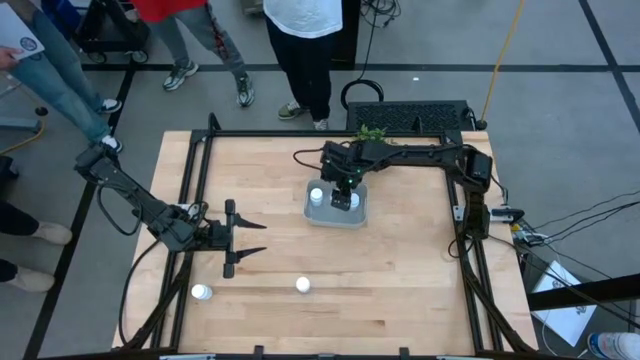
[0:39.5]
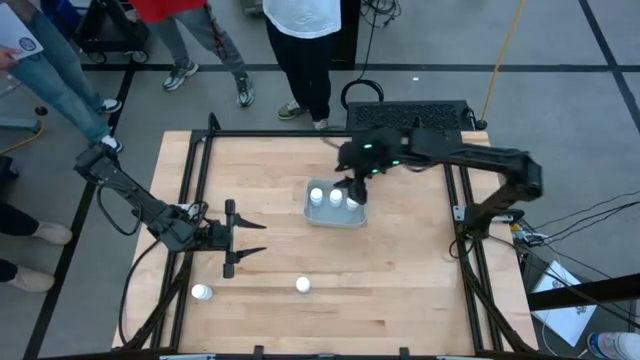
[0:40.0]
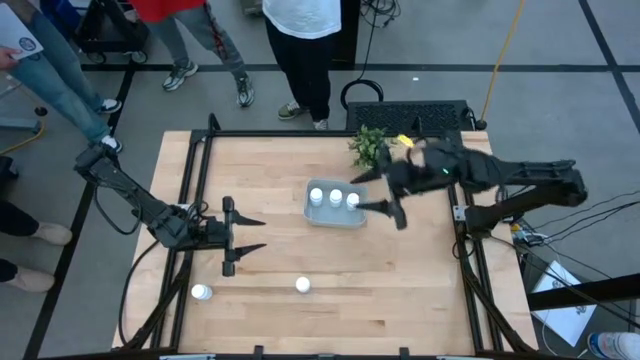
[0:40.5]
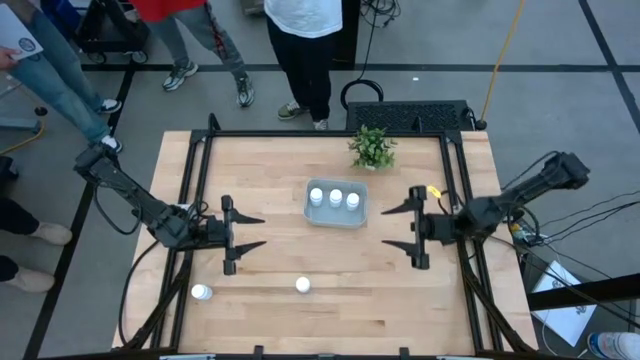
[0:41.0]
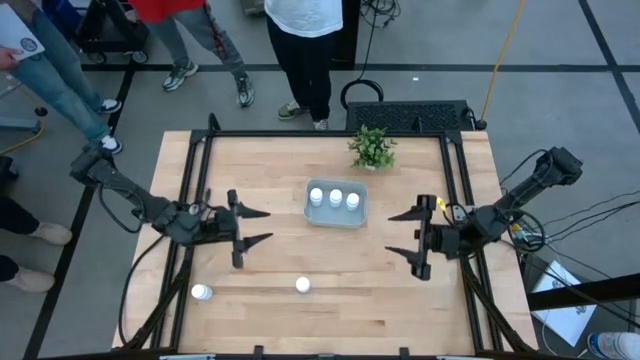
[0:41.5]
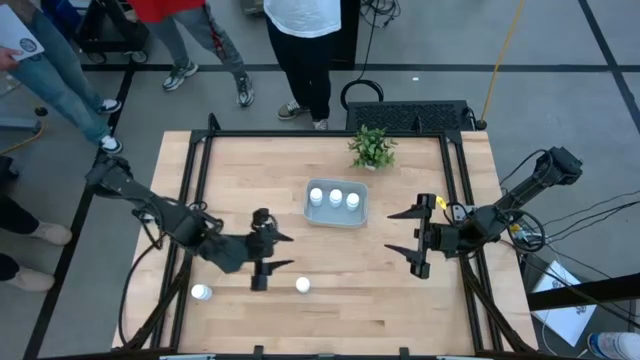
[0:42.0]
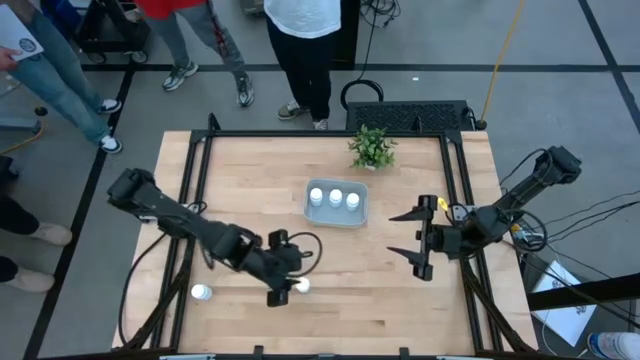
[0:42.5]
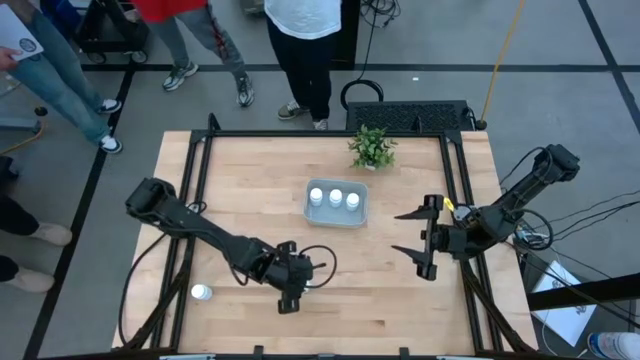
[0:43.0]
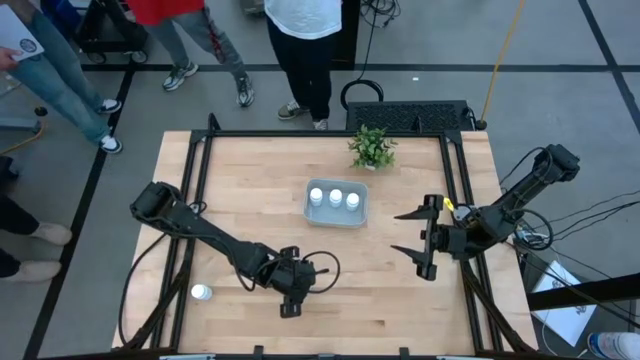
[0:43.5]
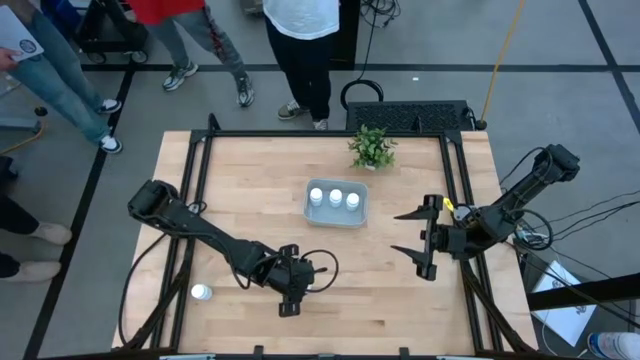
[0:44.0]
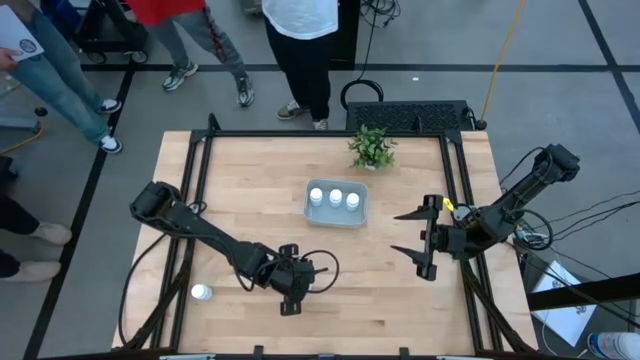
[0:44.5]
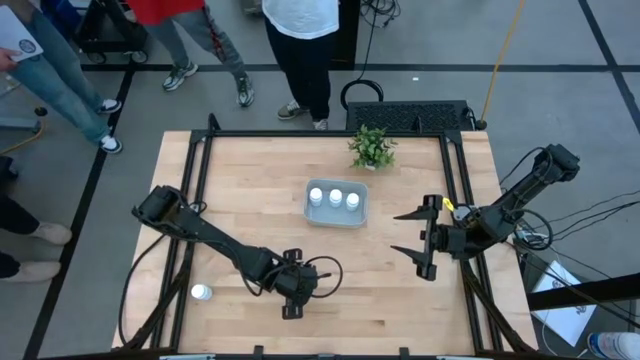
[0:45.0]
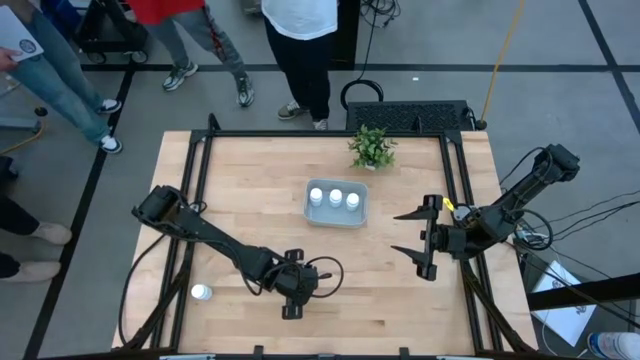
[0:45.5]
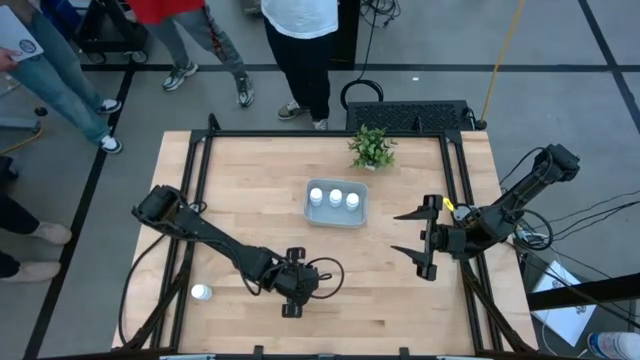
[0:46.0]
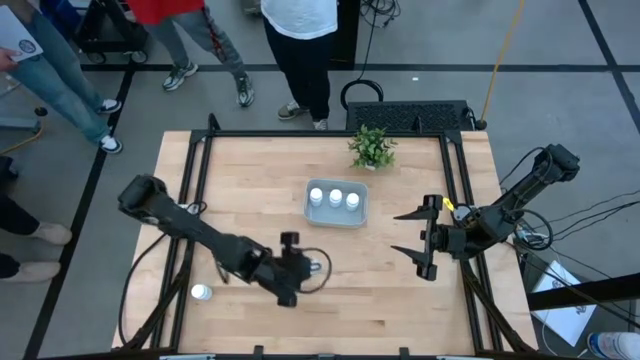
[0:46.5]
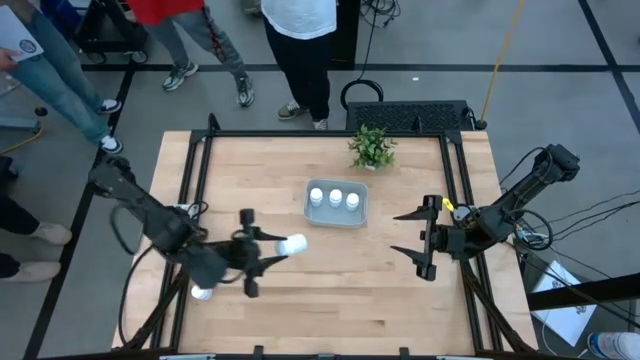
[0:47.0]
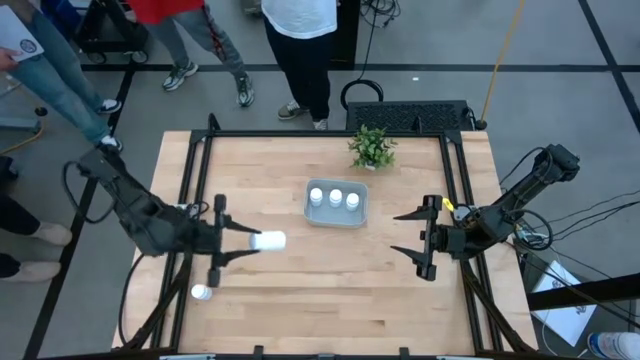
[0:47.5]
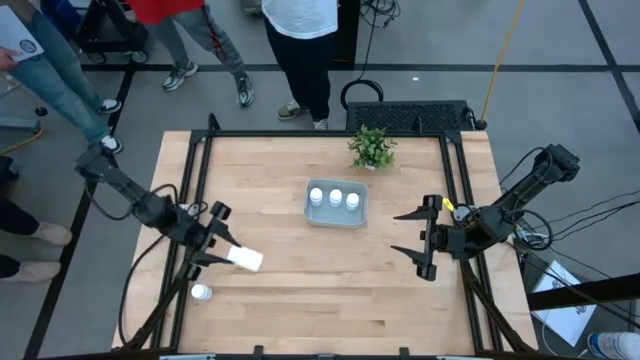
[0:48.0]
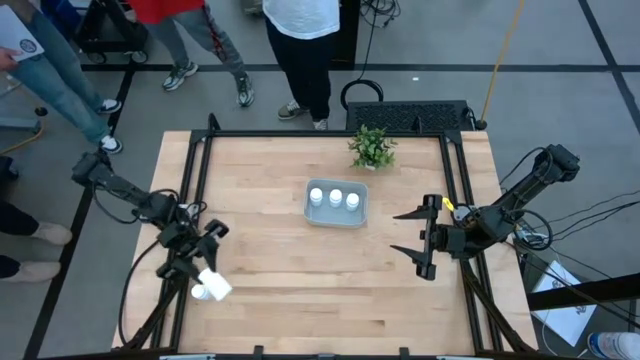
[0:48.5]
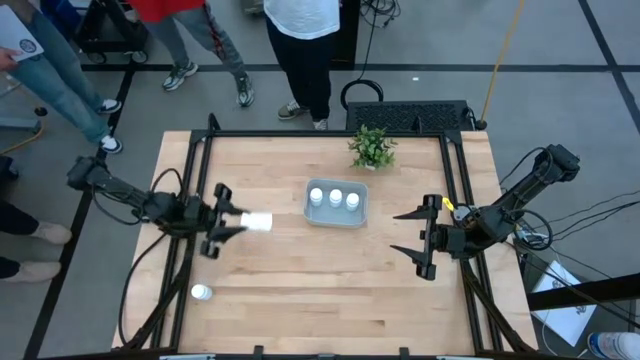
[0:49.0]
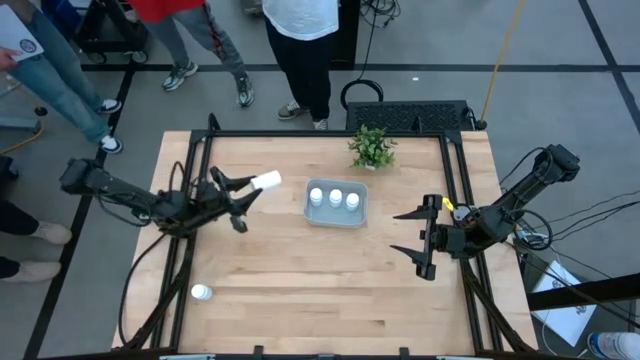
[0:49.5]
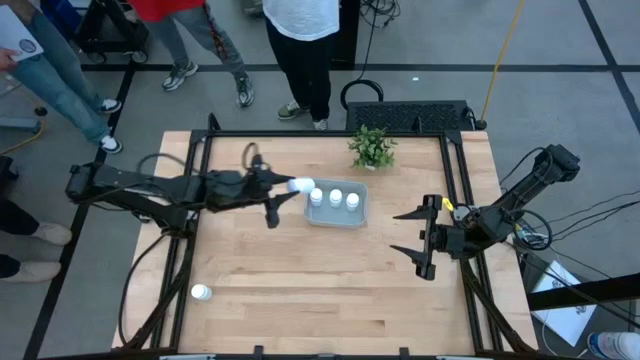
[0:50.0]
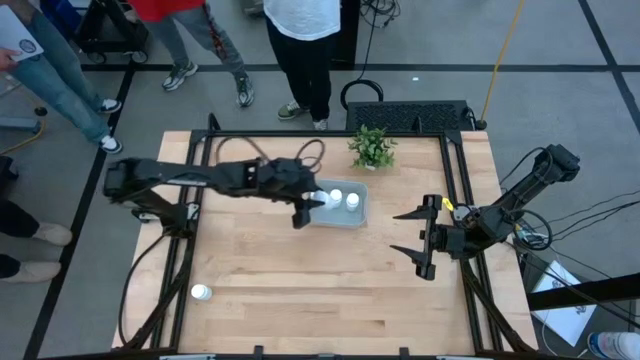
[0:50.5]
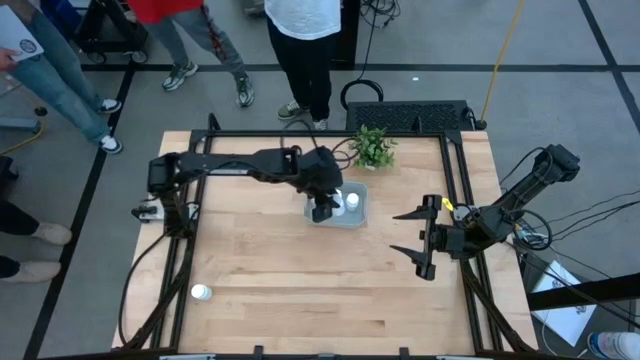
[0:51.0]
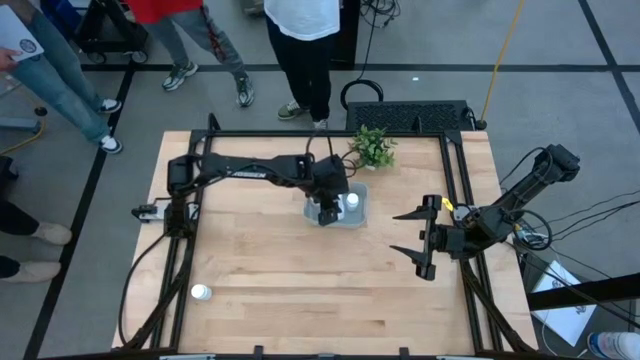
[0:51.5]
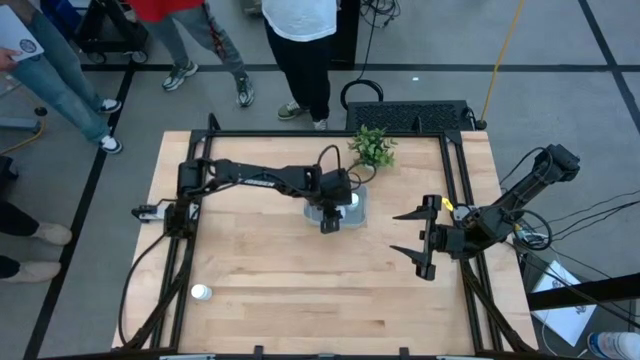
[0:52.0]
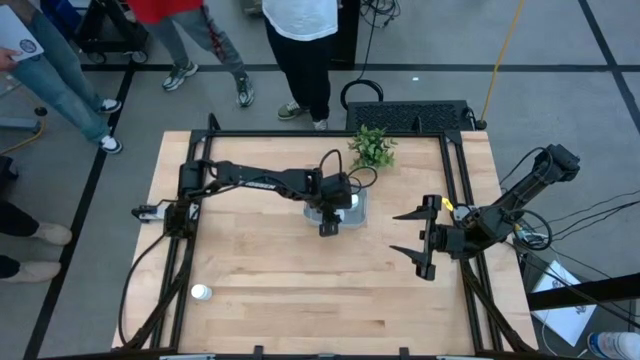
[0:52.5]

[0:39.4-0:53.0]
Task: Pick and place pill bottles into a basket
Put the white medicine bottle into the bin

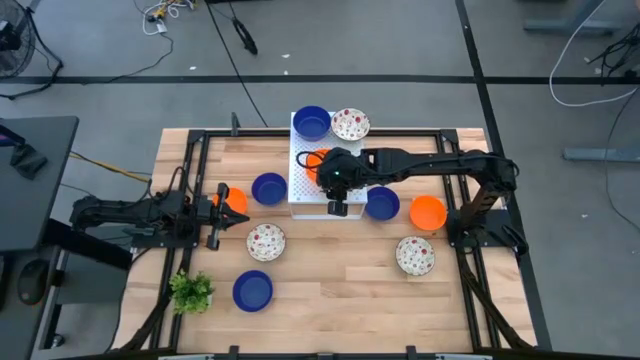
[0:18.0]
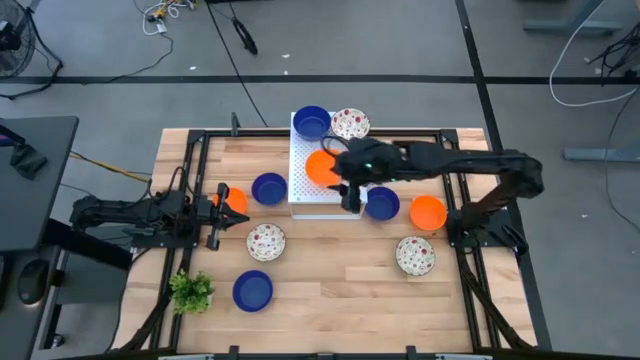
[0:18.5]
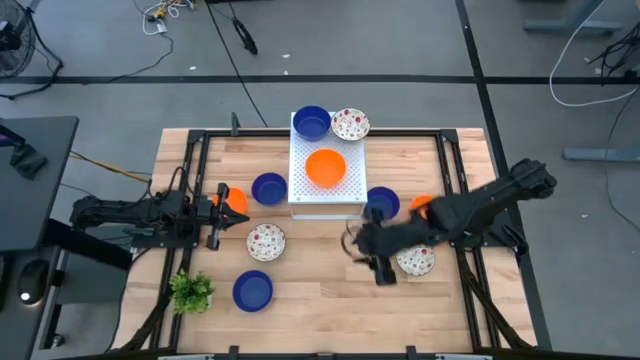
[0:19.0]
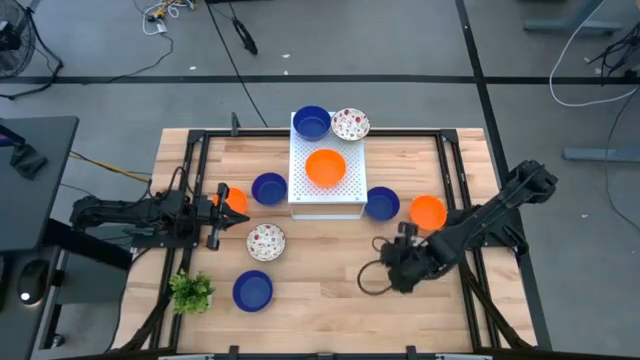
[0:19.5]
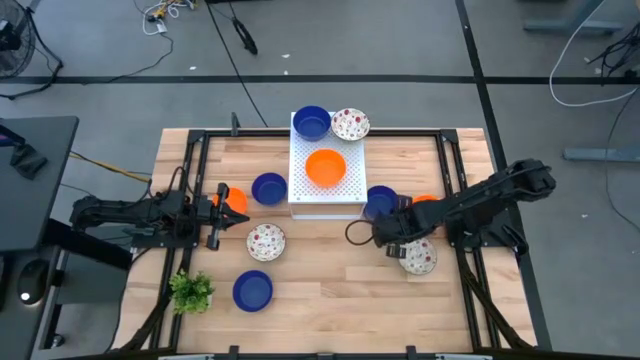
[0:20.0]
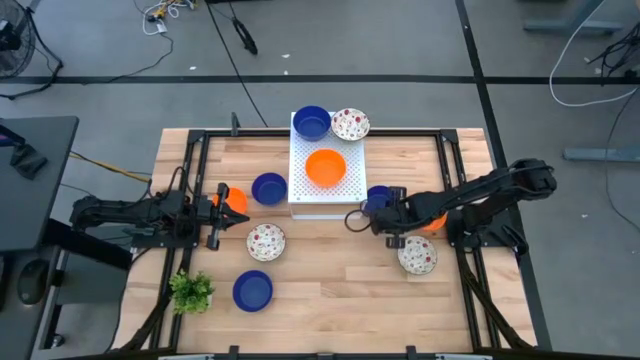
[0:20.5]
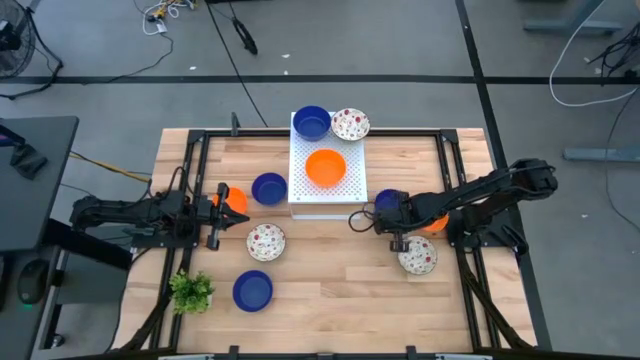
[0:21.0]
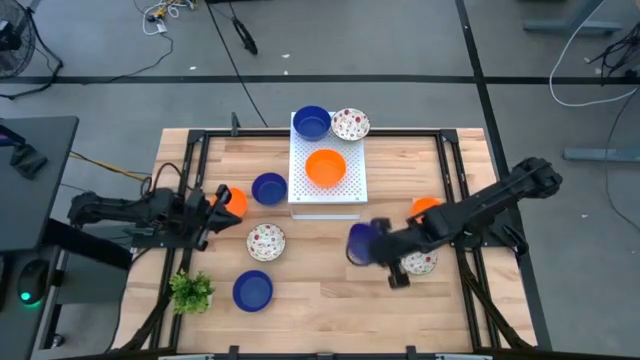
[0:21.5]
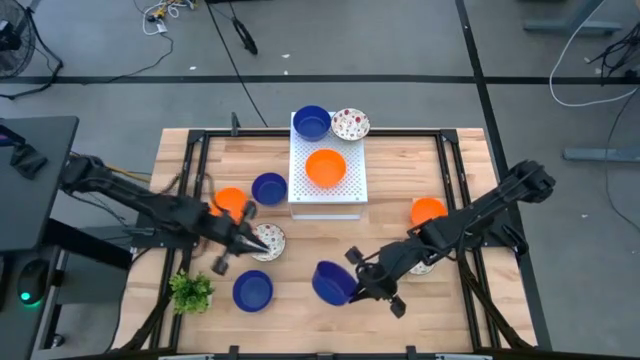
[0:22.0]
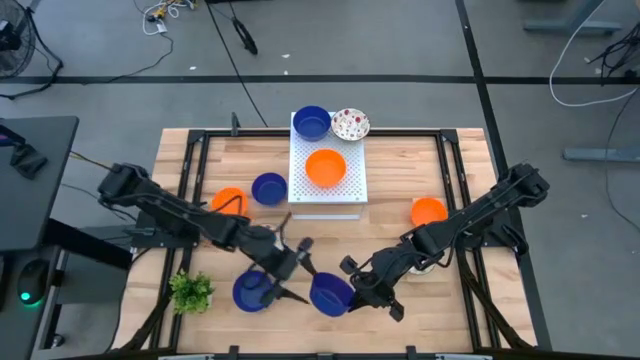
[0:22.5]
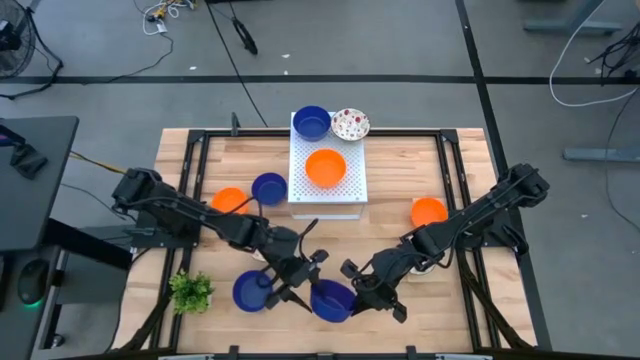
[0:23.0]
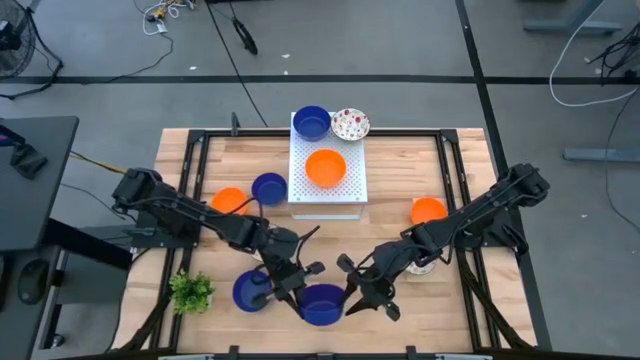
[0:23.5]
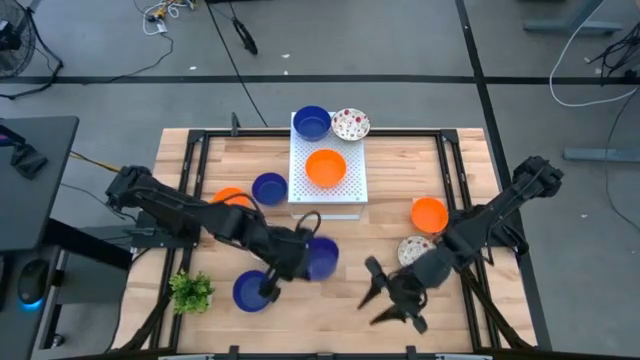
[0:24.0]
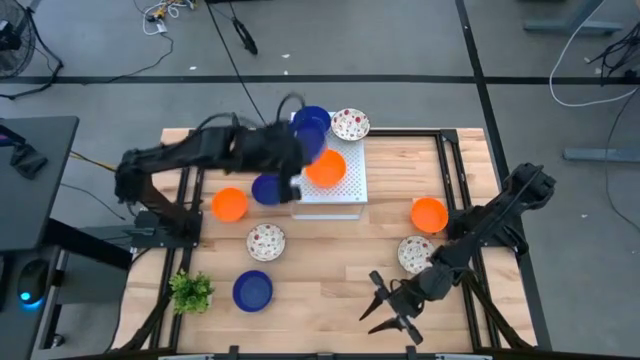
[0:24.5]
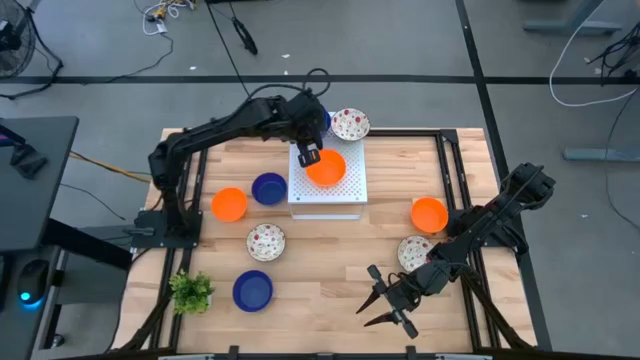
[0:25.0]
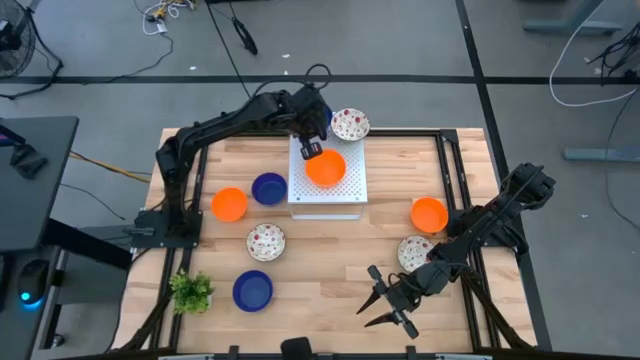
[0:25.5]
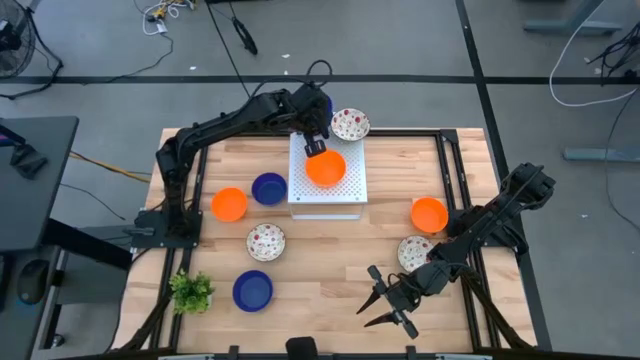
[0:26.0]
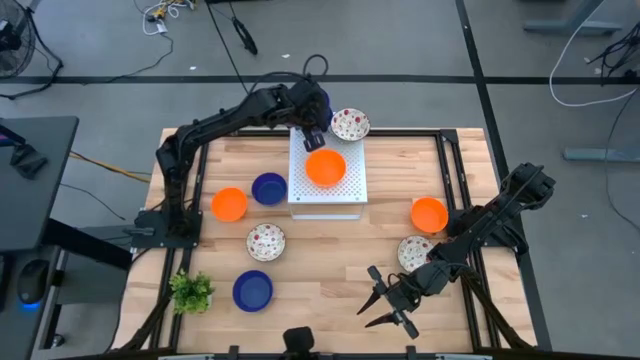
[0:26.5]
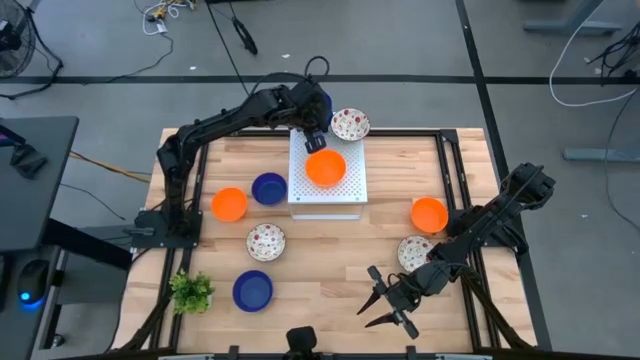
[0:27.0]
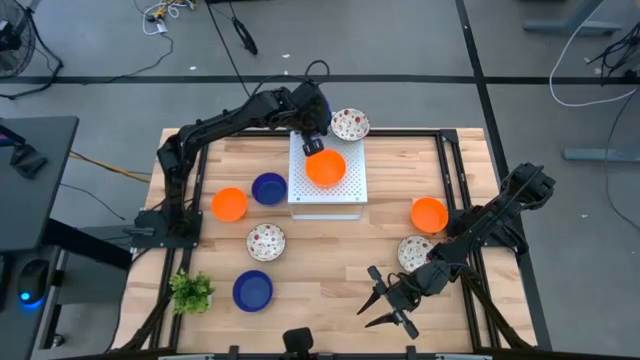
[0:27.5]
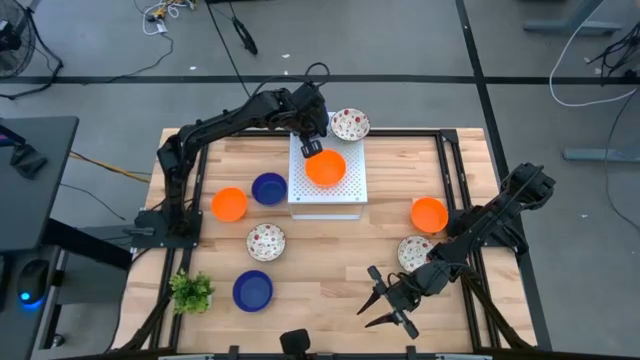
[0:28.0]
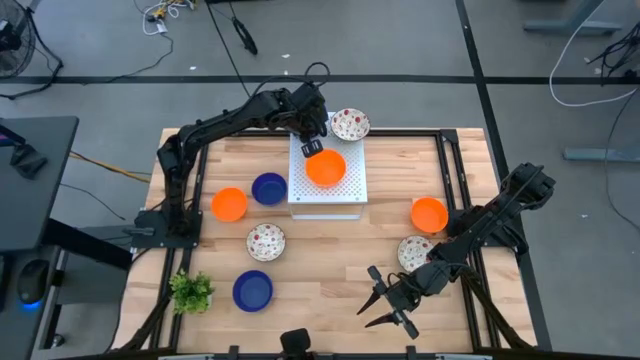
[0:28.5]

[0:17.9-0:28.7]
Task: Pick & Place Mini bowls
Stack the blue bowl on top of the other blue bowl on the shelf
